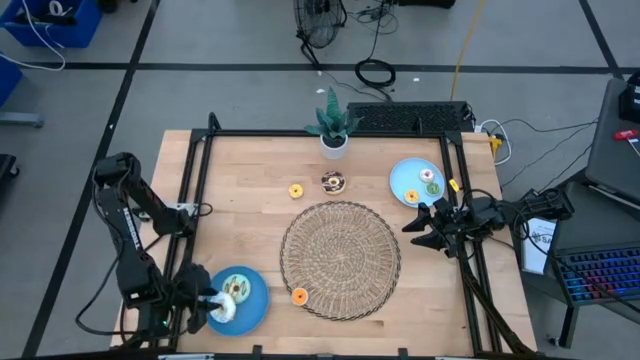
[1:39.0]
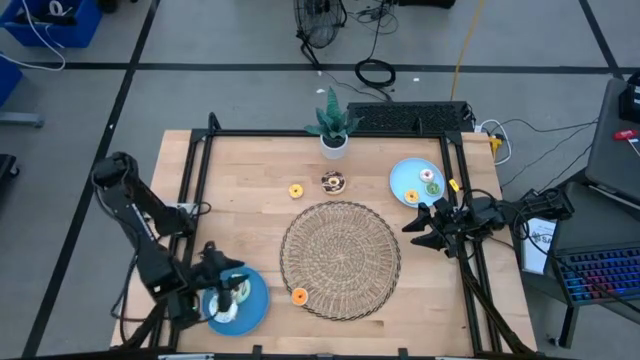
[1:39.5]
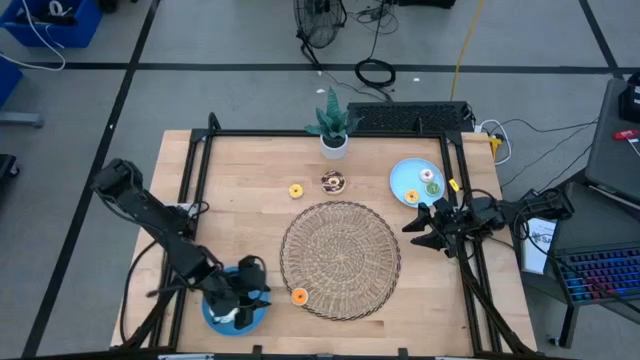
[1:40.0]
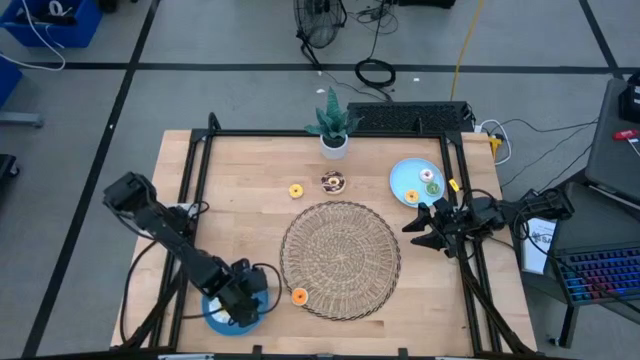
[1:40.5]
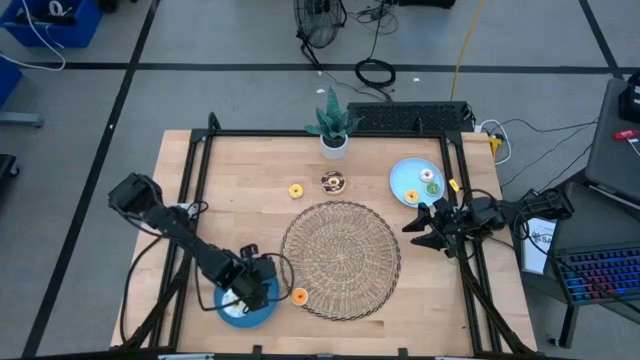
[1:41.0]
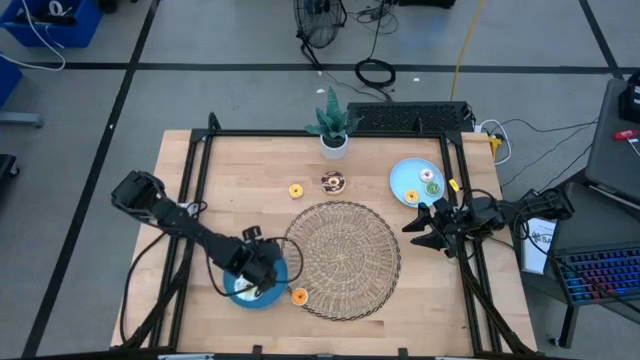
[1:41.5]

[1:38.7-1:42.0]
Task: Pick & Place donuts
Adjust the blue plate

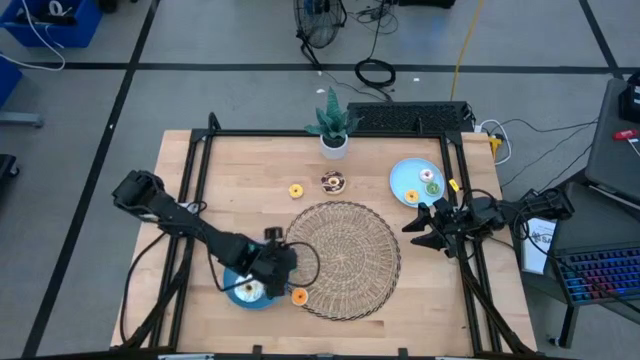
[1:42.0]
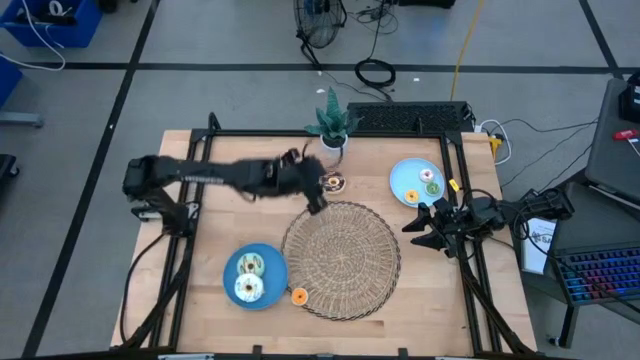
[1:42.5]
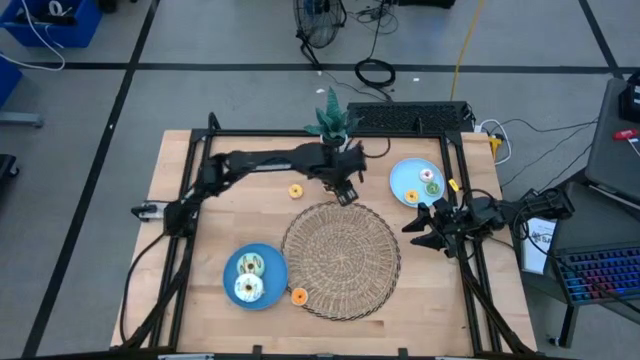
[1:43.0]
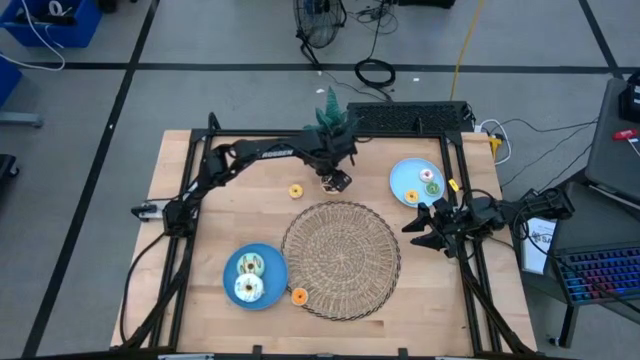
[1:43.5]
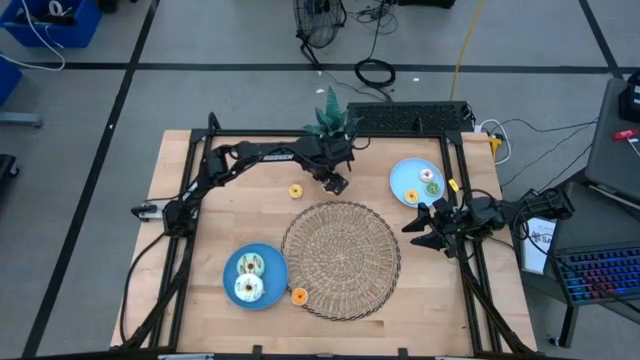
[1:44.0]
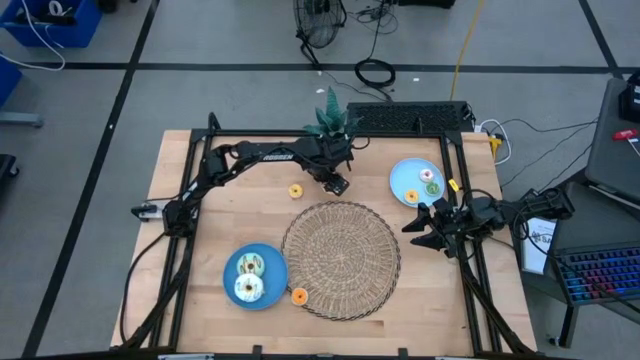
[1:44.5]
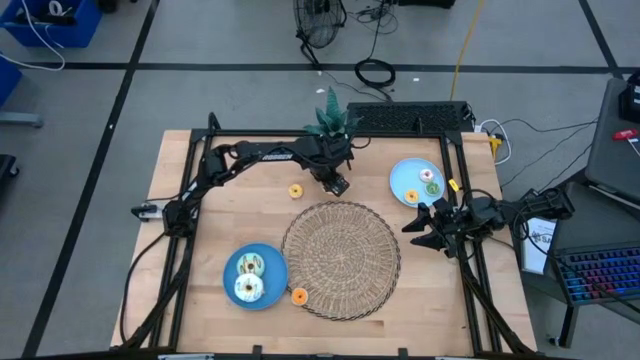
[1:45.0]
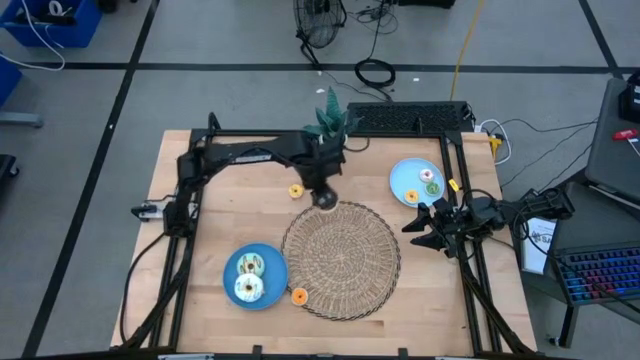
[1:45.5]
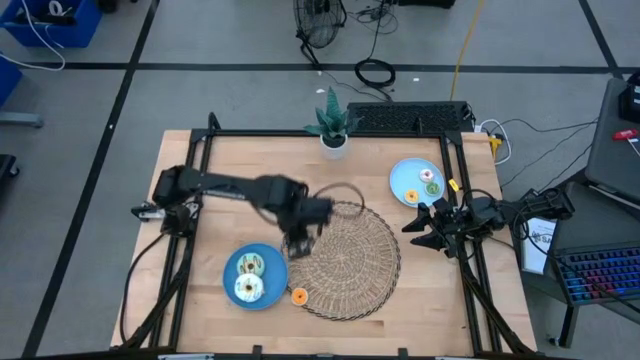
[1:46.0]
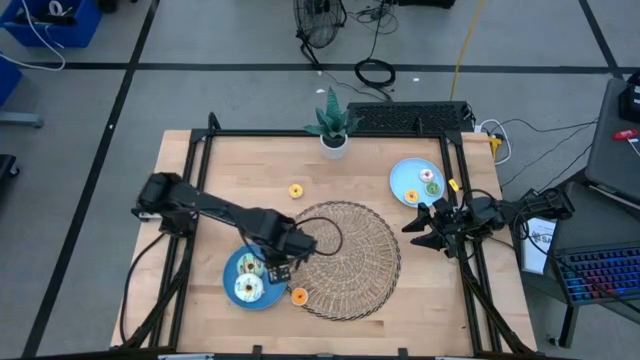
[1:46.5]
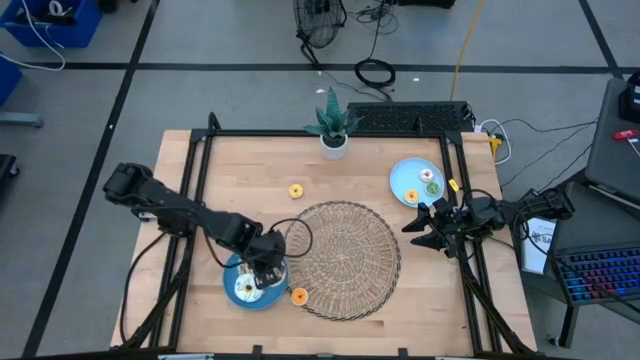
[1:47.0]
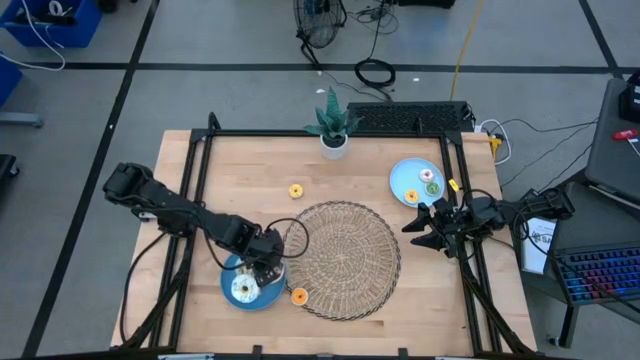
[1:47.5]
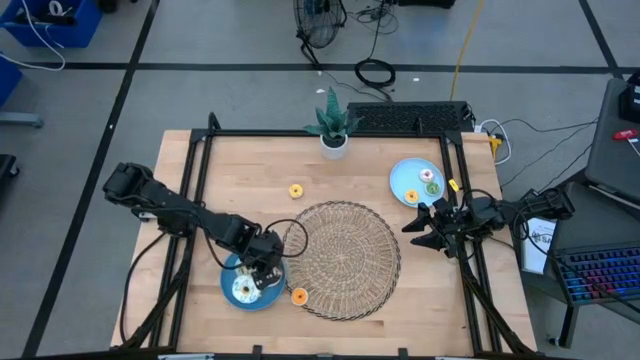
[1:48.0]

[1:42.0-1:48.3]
Put the large black donut on the blue plate

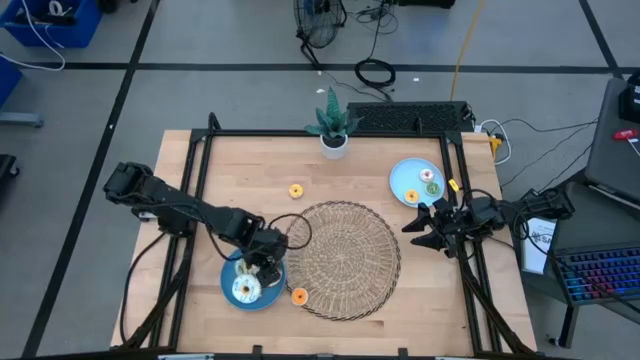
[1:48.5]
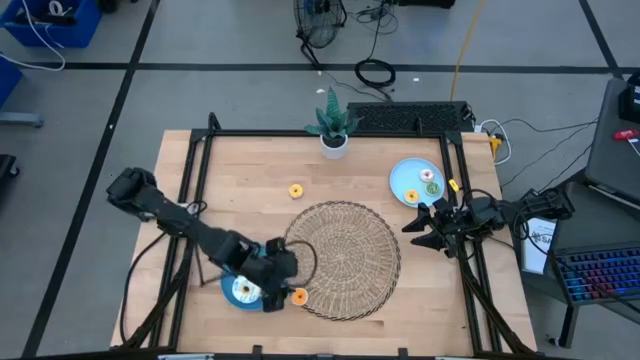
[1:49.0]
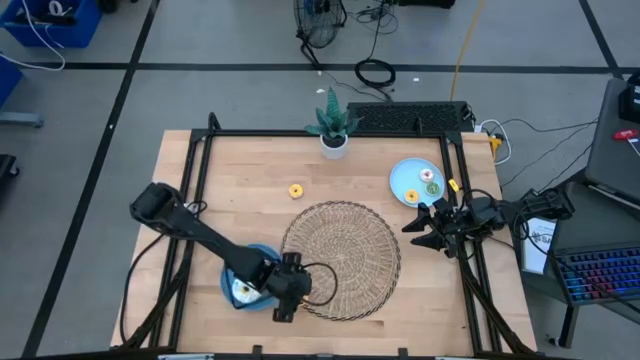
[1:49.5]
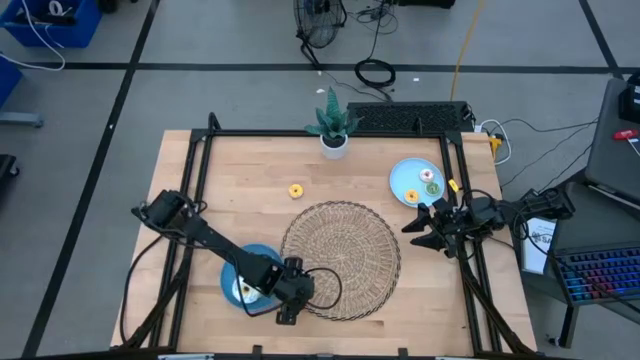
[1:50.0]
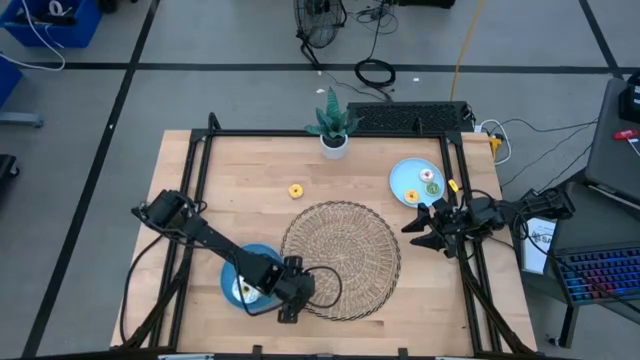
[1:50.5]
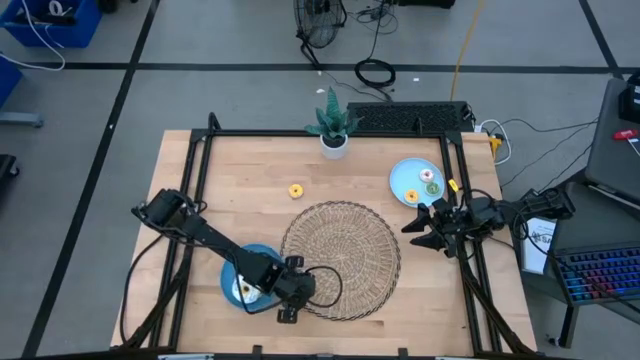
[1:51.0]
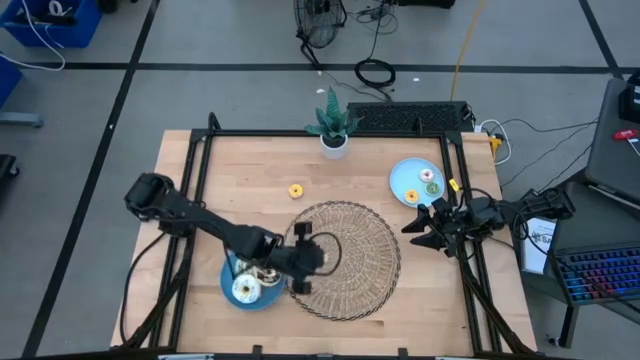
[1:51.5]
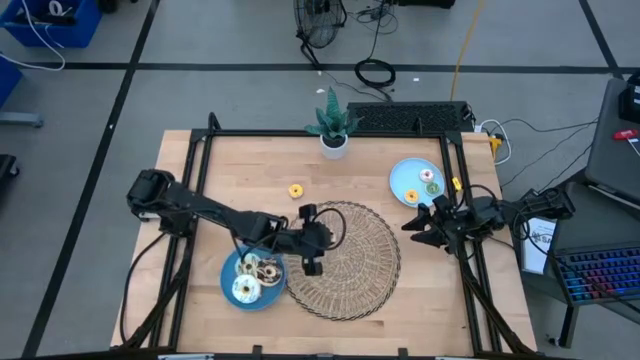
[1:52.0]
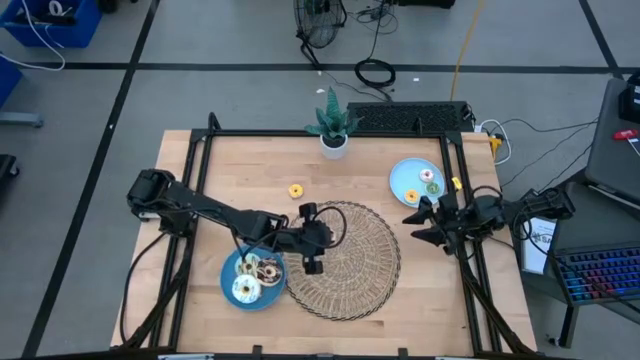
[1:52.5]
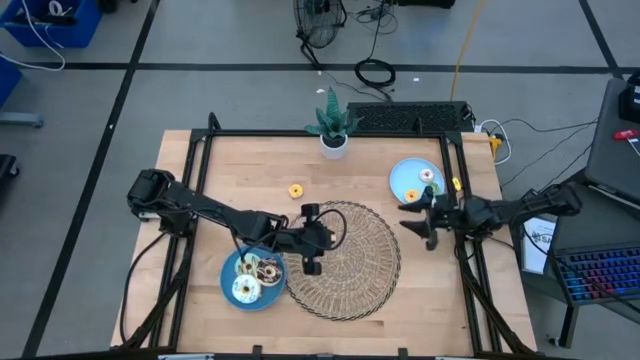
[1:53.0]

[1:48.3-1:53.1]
Put the small orange donut on the light blue plate

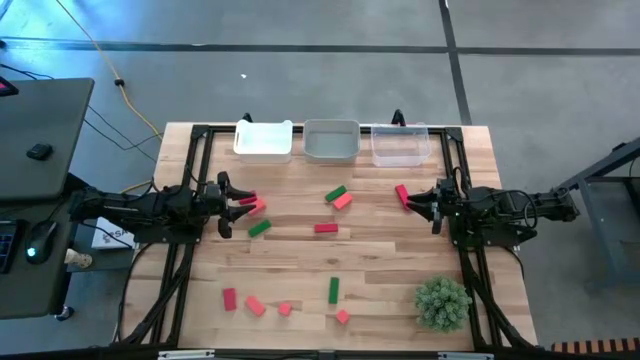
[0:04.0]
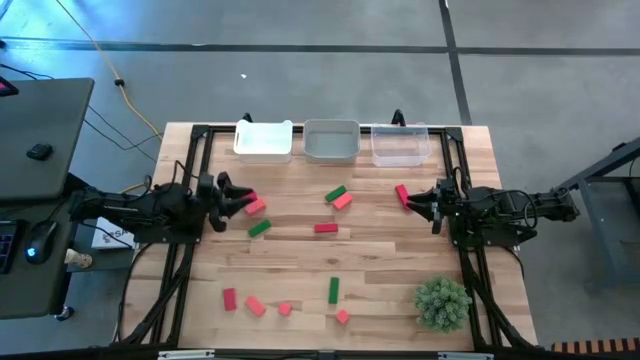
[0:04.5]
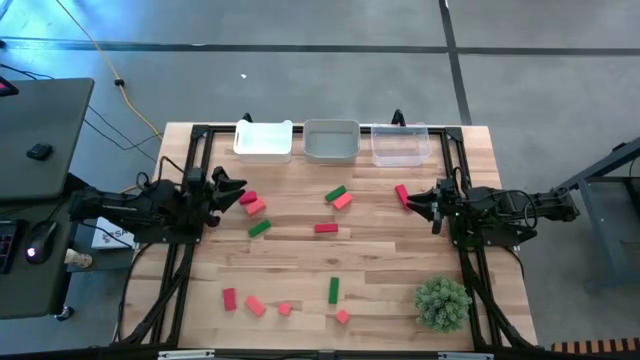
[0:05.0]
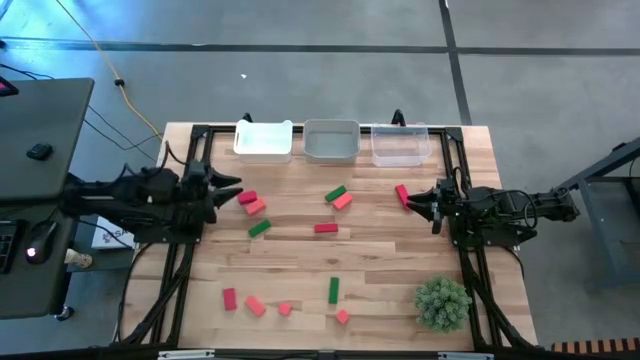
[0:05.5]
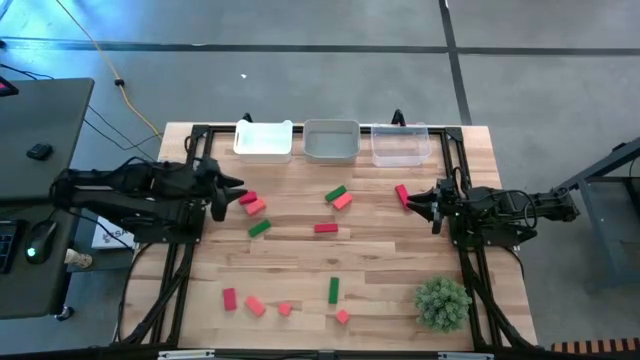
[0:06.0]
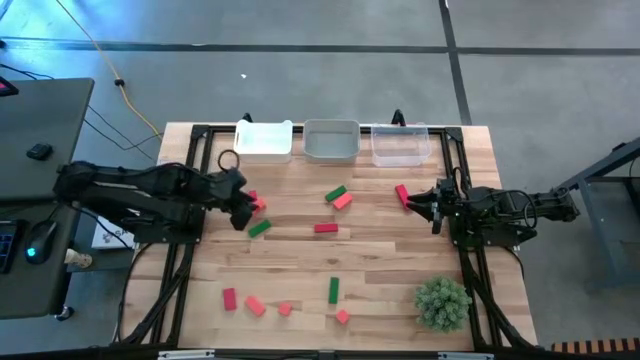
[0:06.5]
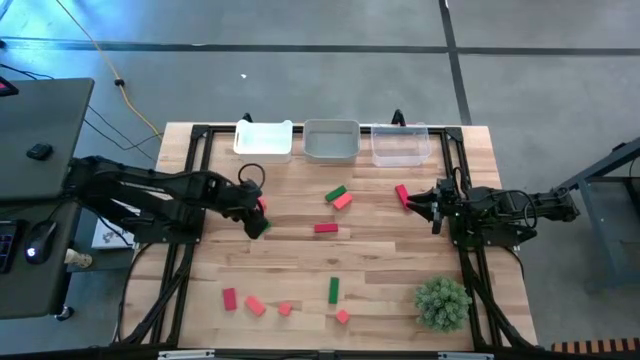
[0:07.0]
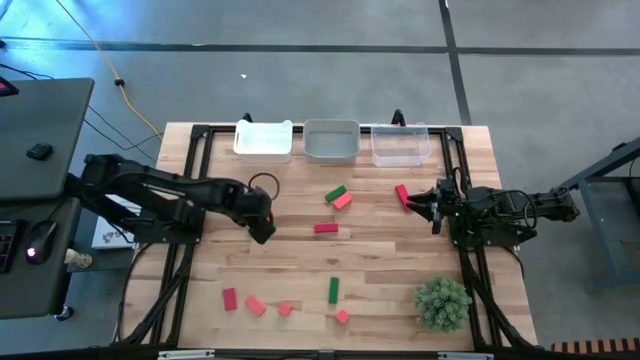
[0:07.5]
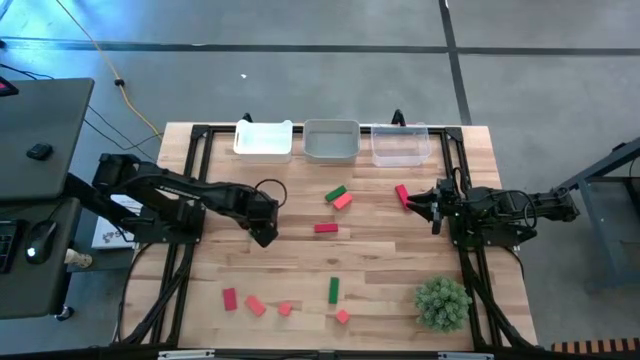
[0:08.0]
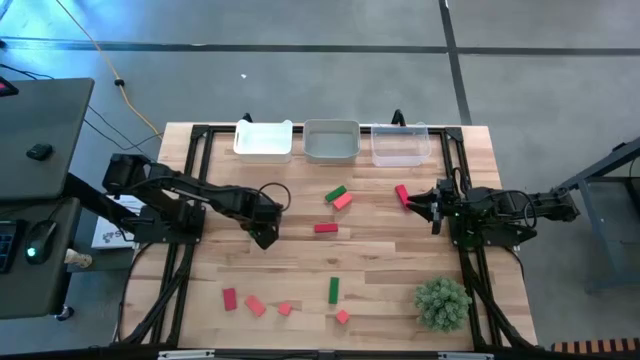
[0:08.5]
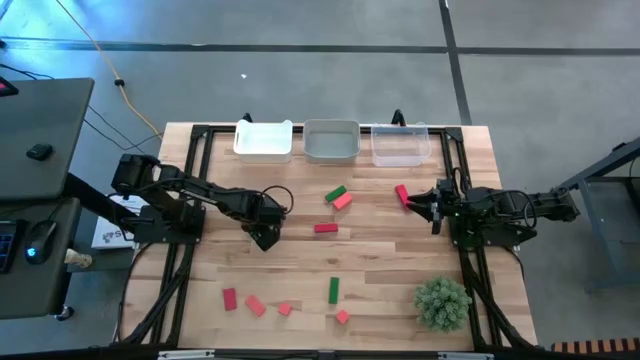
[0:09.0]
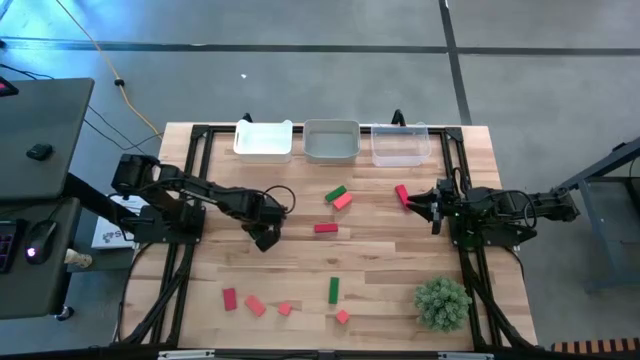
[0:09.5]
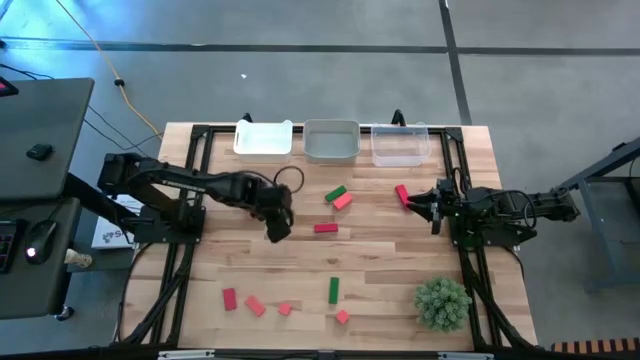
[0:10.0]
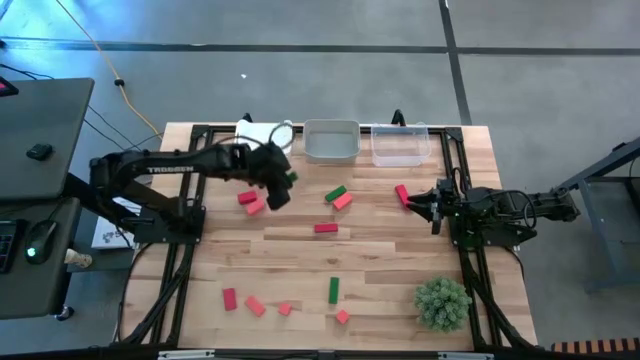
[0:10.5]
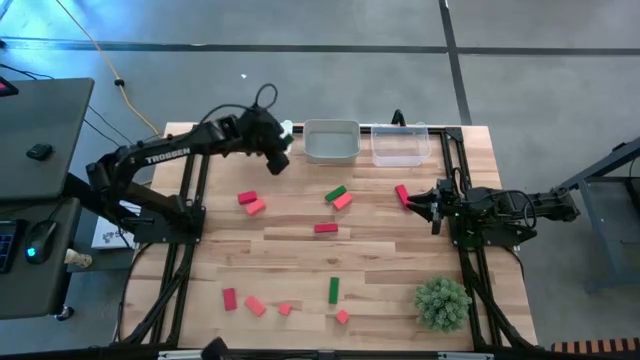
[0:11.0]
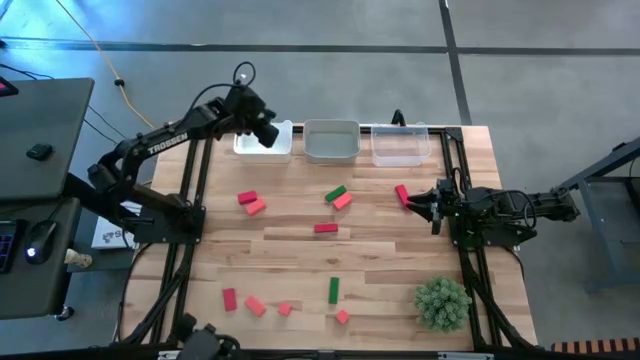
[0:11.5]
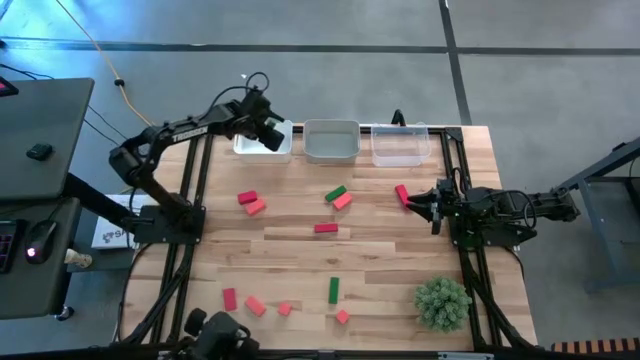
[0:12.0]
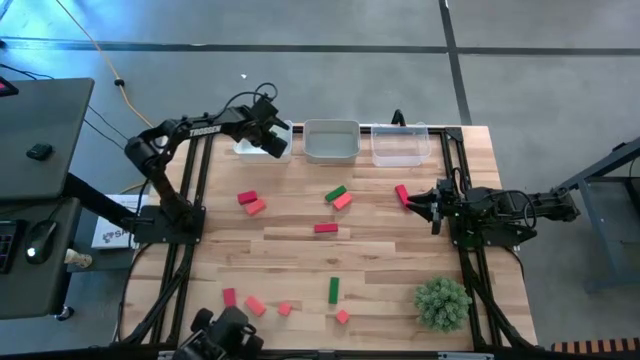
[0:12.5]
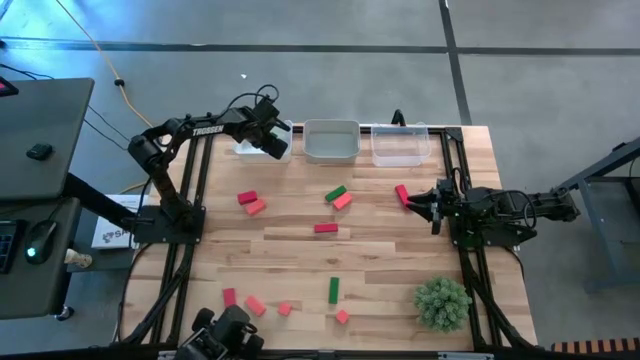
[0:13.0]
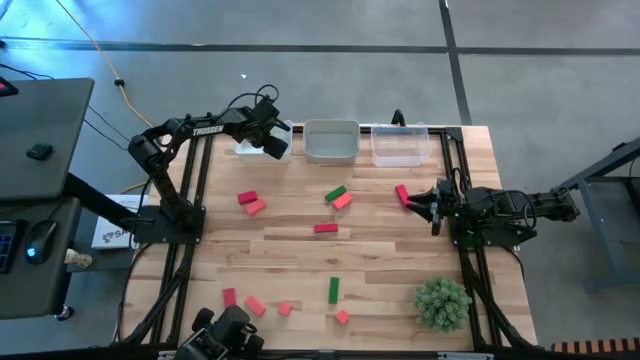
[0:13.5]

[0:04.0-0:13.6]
Task: Sort & place blocks by color
Put the green wooden block into the white bin
